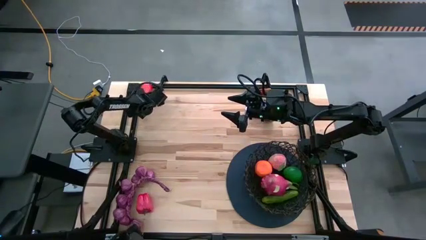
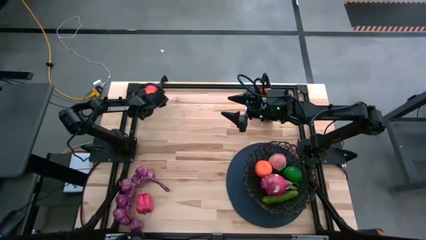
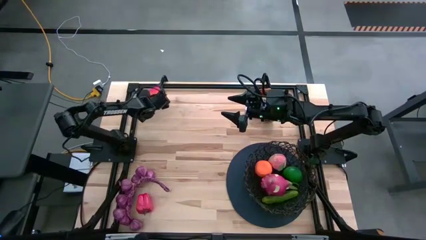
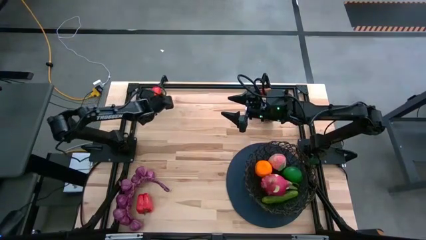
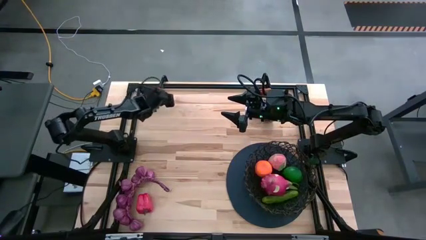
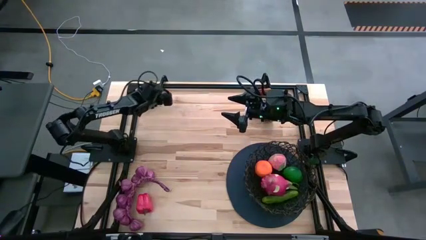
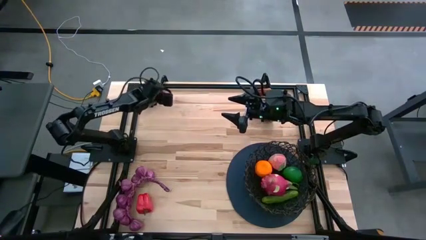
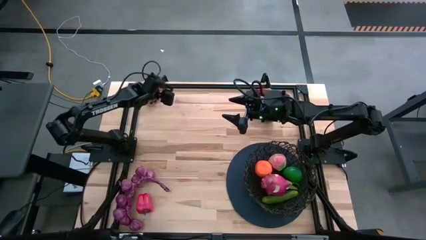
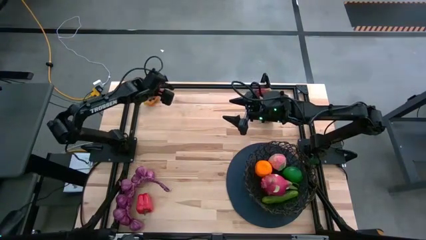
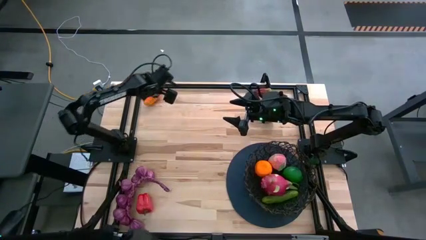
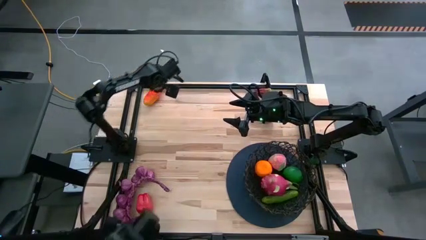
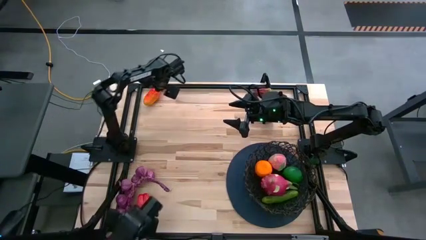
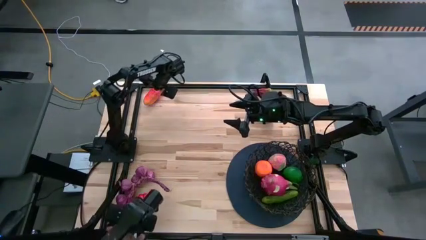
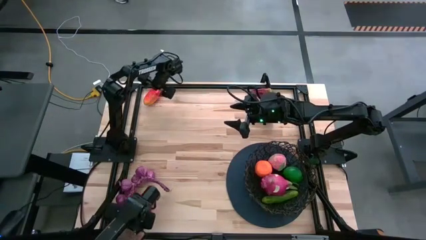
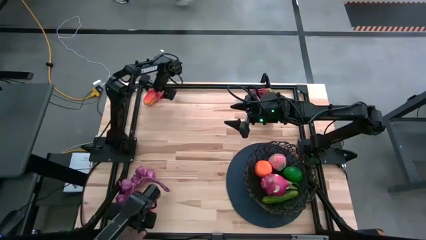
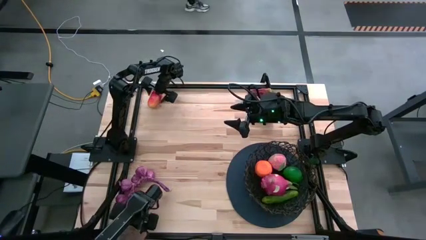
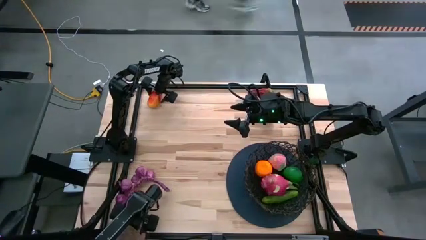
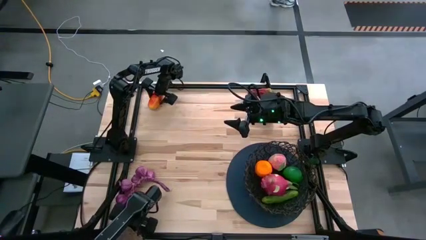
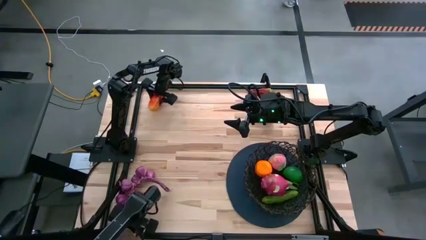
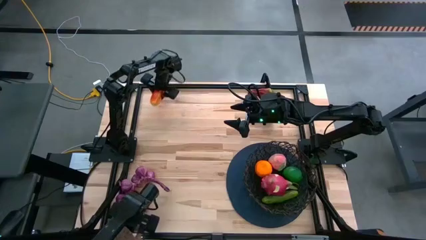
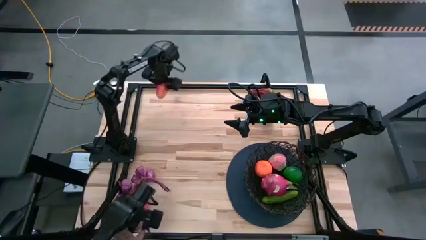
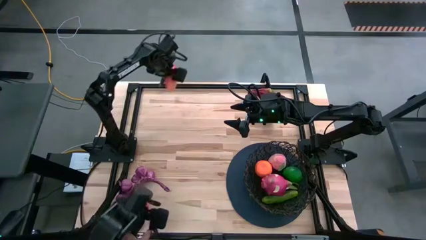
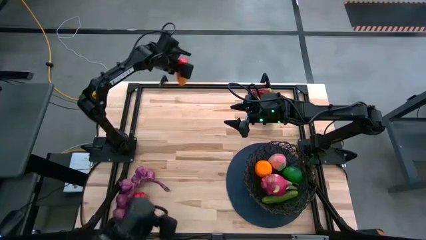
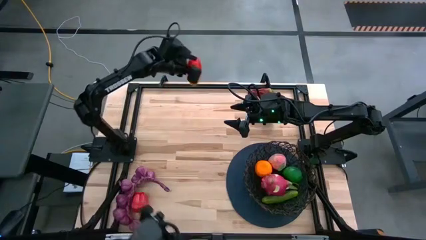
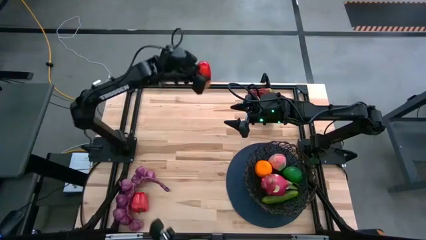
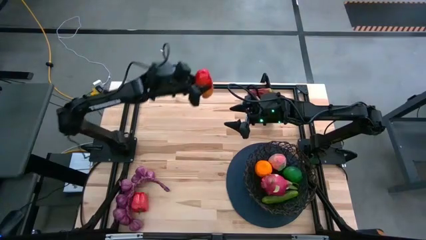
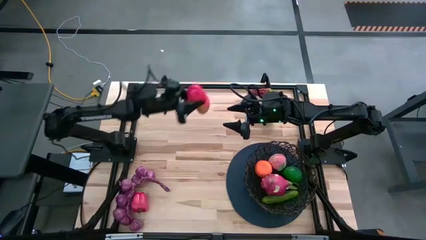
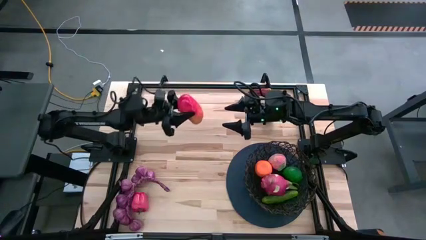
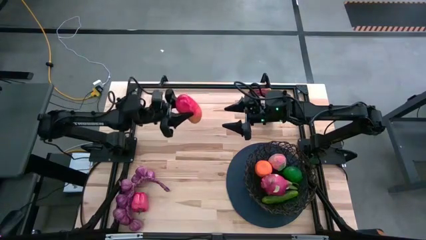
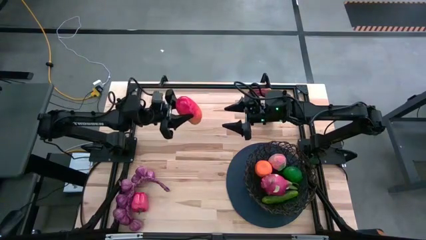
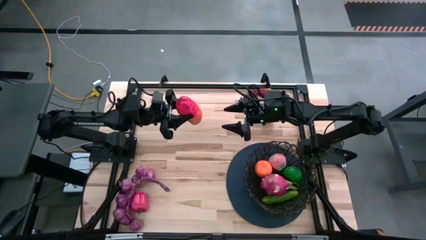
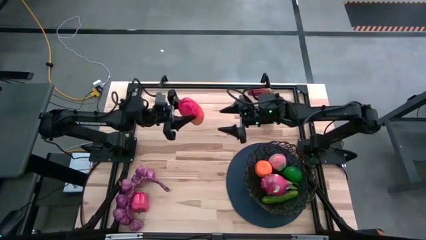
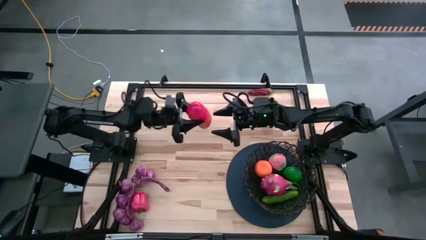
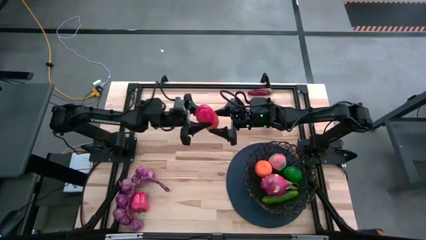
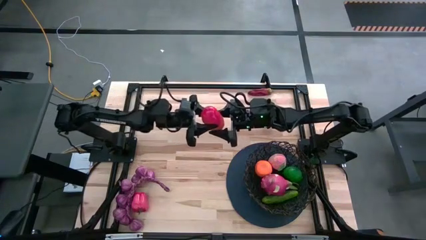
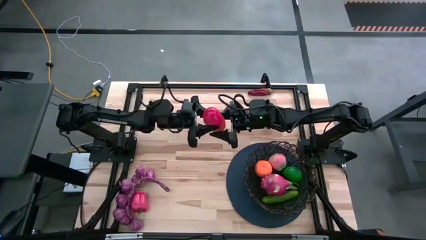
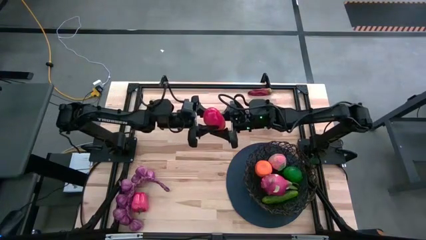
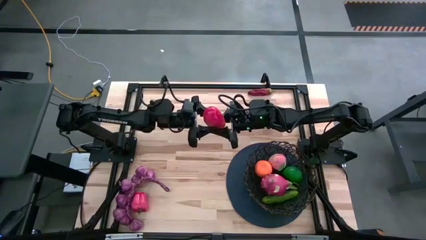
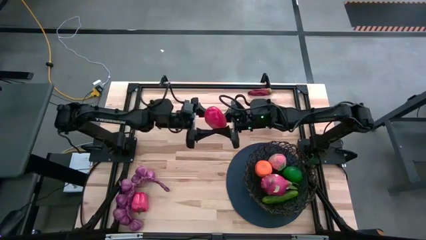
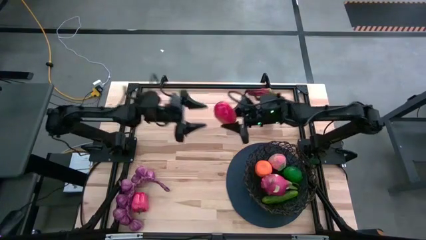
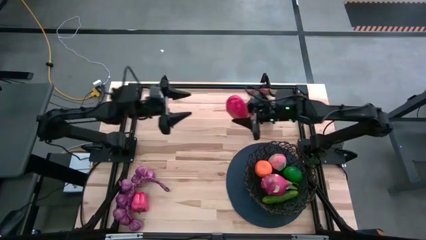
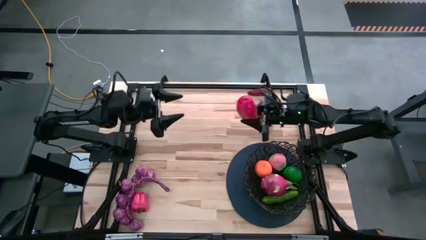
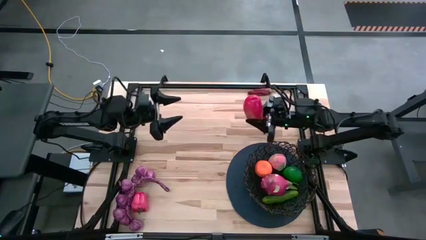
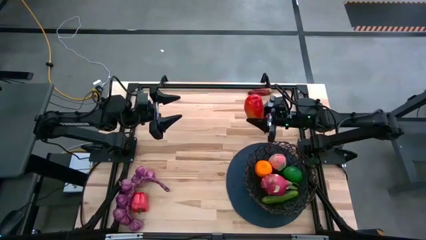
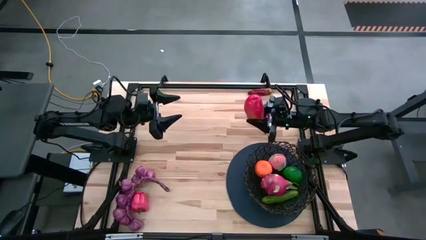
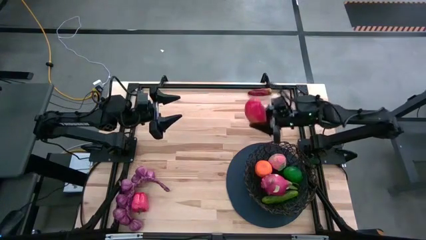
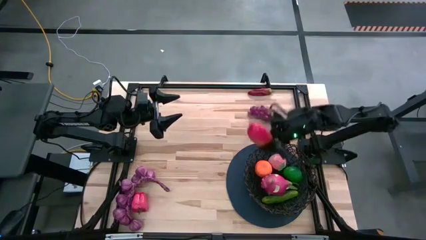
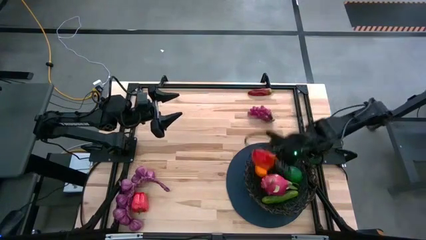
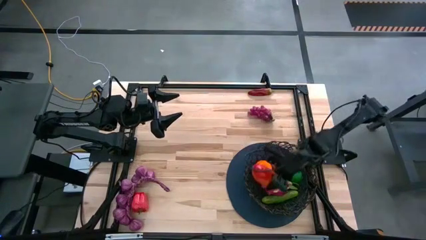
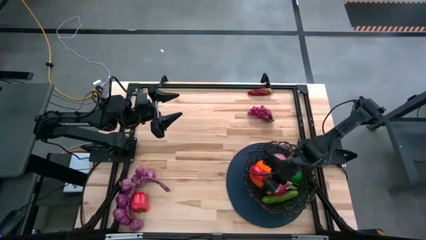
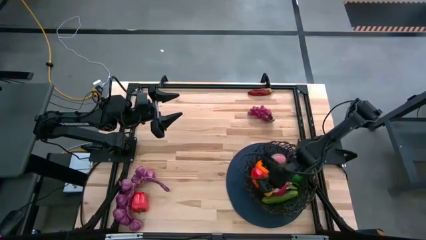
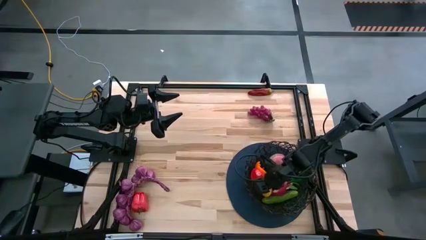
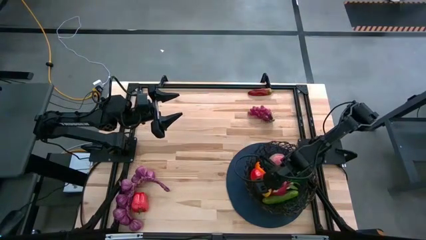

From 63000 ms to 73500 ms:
Task: Build produce basket
Put the orange mango into the basket
